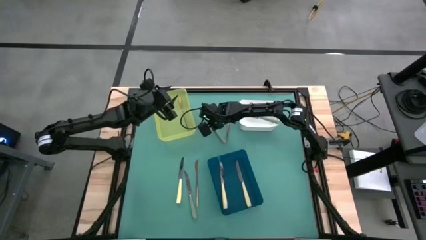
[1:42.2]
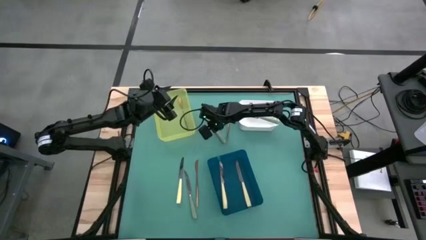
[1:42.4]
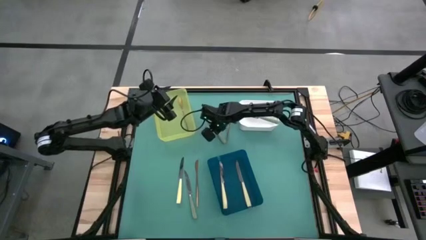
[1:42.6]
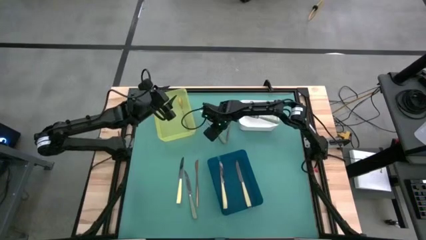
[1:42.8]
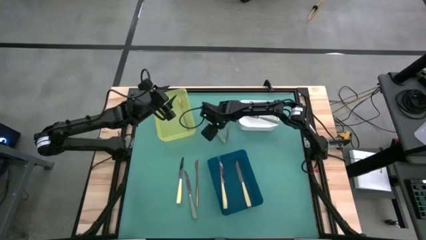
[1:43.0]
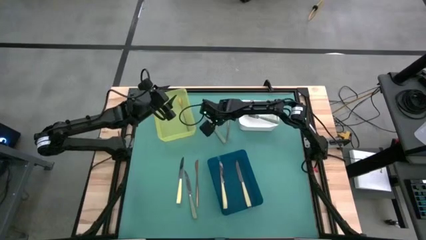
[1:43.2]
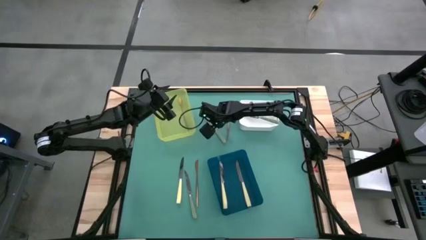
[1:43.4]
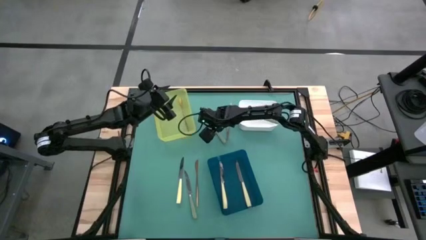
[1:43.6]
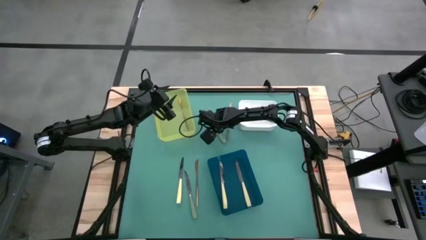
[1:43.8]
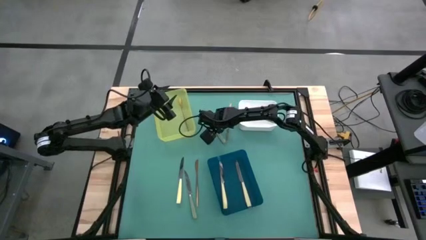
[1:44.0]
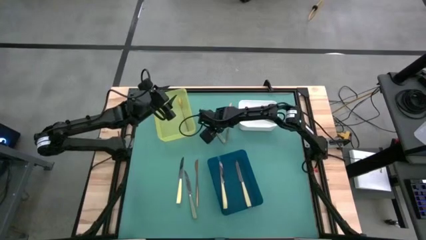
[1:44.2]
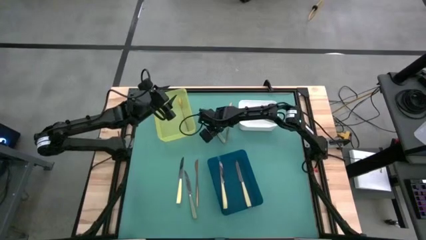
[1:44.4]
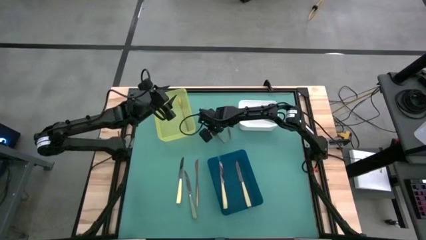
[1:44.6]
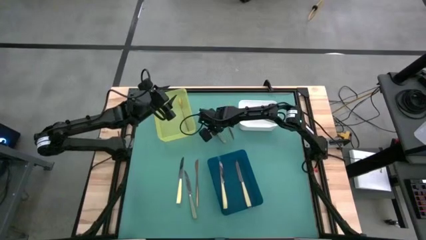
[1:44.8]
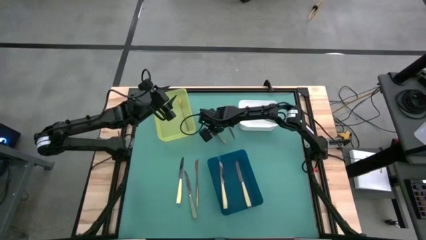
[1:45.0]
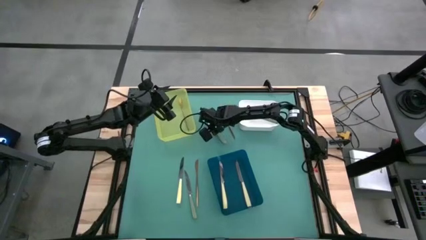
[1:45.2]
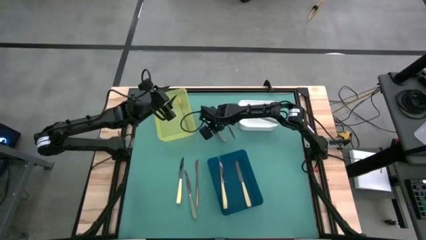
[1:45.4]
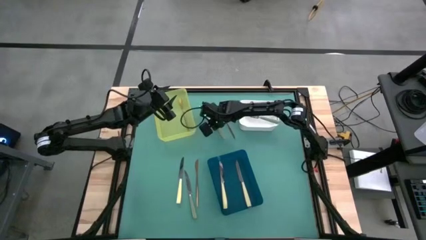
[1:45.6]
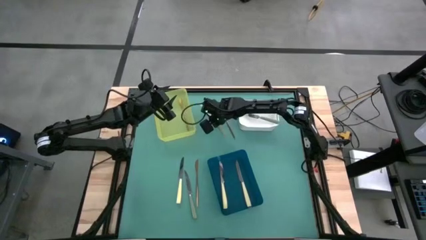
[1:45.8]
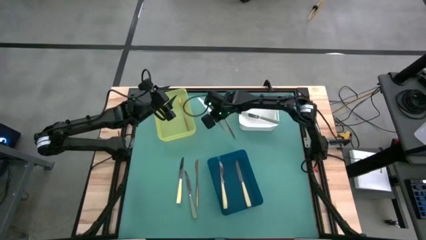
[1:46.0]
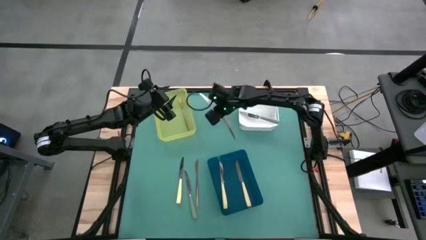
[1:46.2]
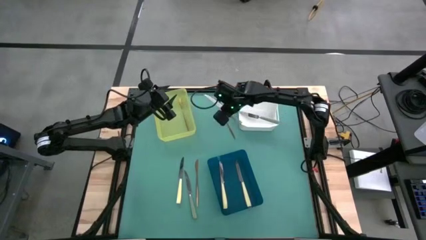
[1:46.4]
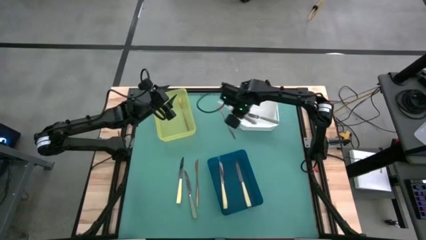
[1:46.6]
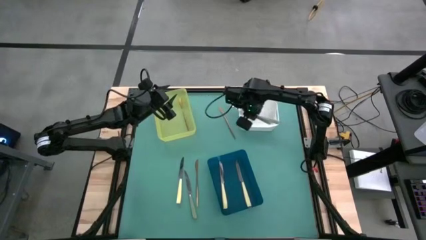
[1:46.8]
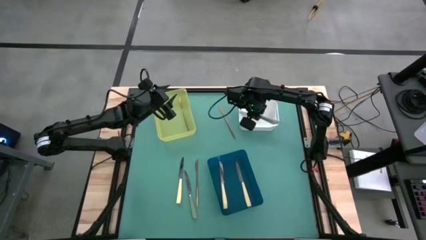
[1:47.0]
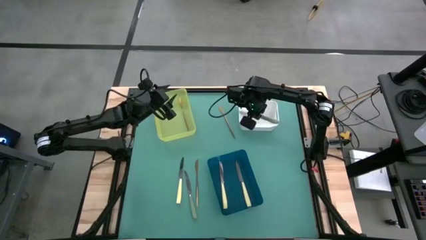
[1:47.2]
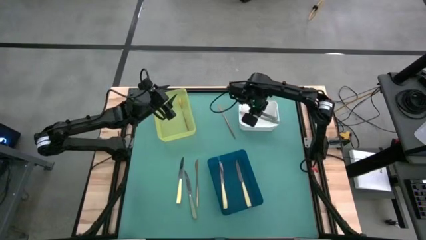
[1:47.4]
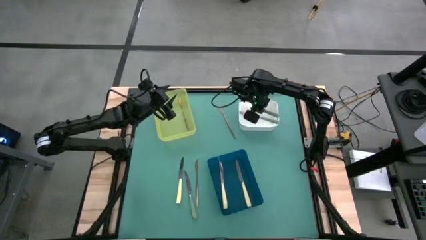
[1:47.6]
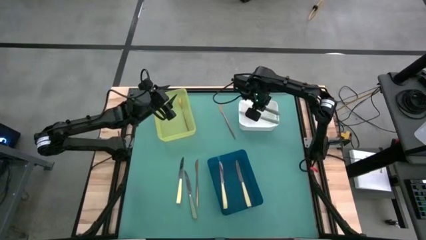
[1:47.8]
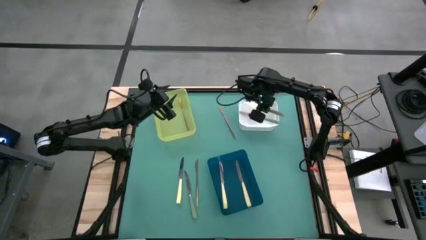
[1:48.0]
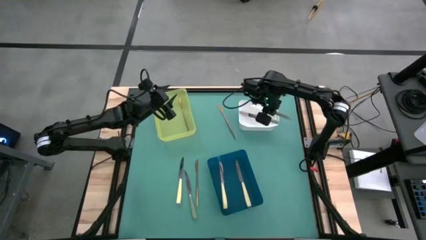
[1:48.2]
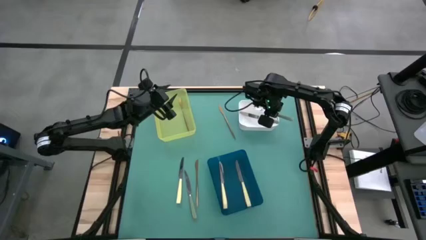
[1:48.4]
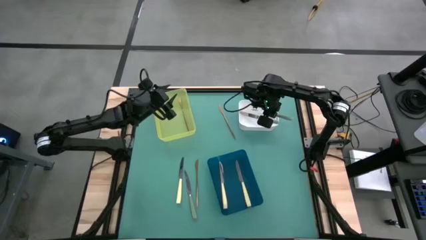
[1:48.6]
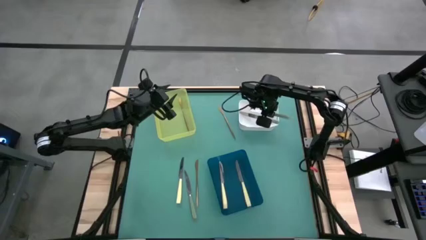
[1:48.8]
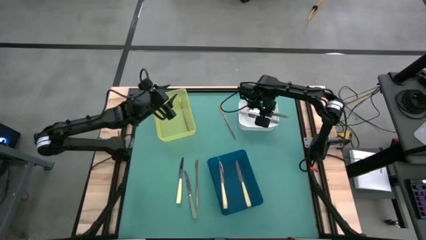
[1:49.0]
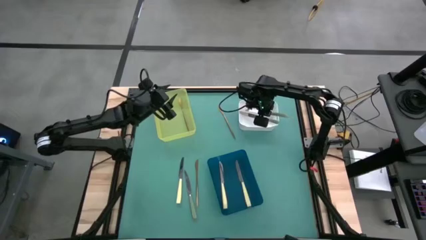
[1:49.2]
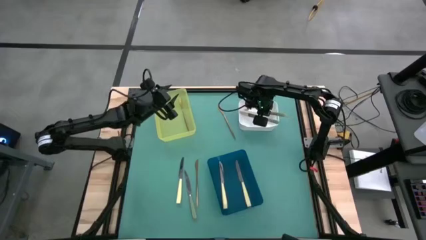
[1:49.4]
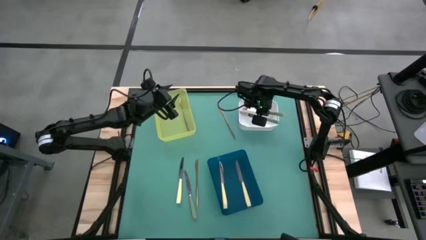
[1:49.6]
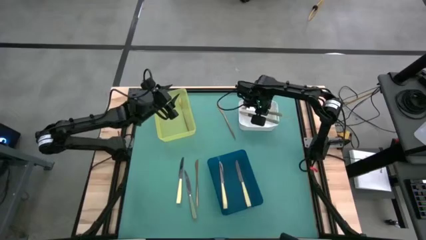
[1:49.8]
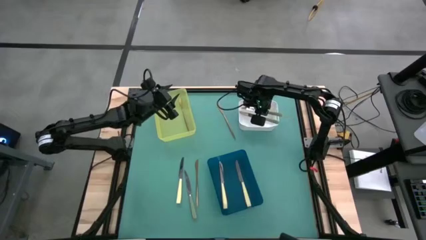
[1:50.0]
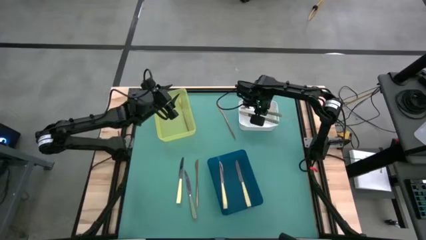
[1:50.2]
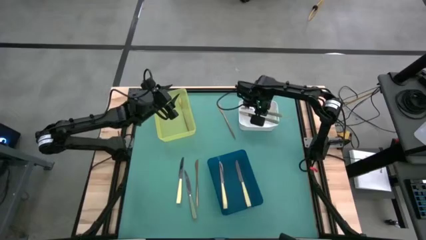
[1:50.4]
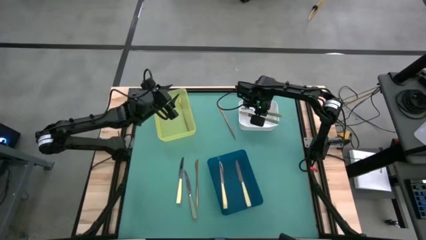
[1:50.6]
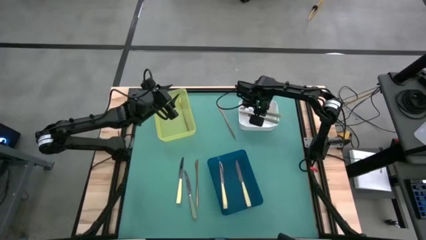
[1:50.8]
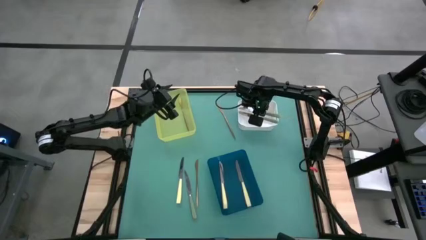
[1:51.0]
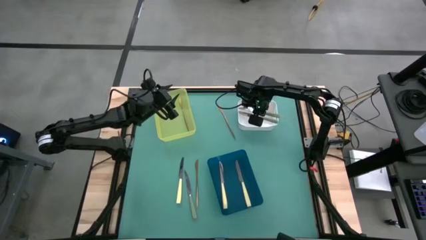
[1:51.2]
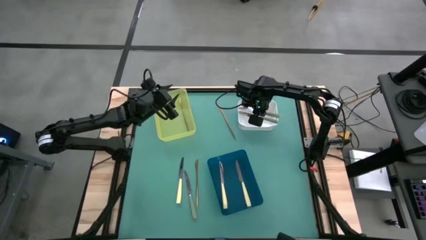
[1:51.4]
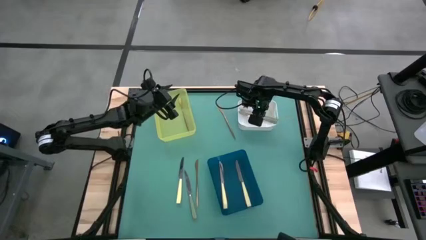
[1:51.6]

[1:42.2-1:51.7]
Task: Sort silverware by color (type)
Put the top green knife into the white bin
